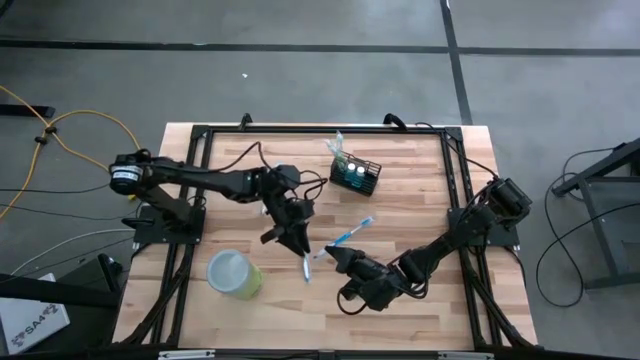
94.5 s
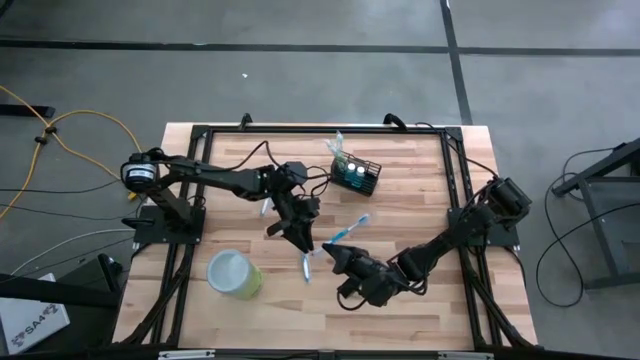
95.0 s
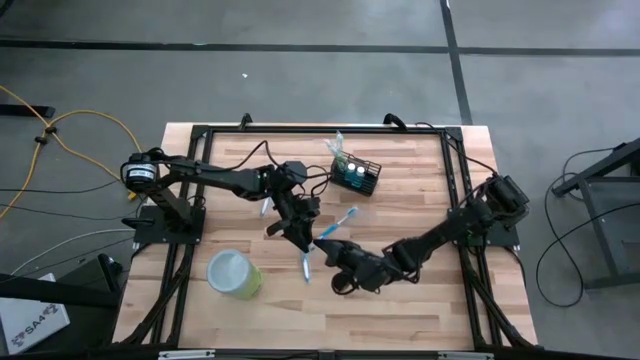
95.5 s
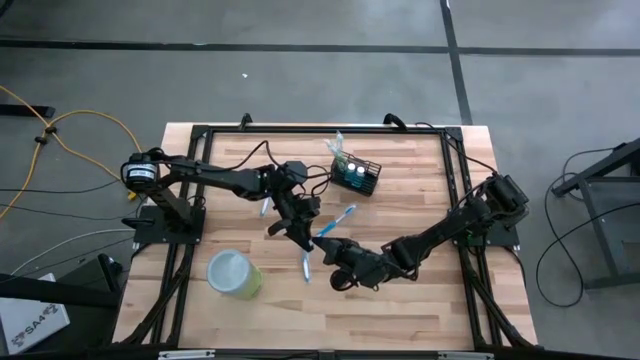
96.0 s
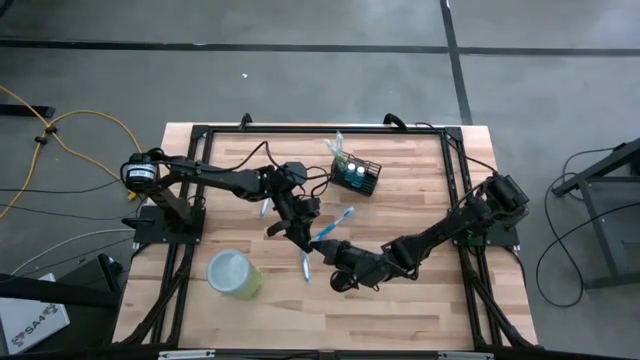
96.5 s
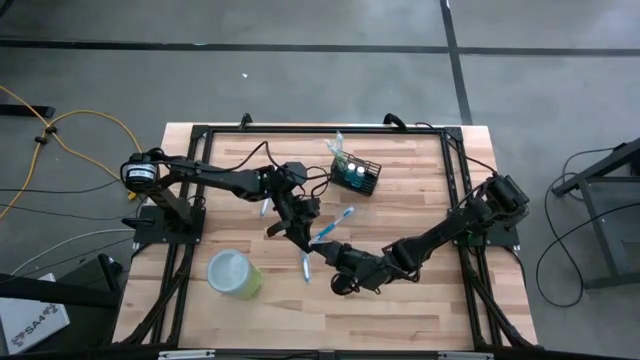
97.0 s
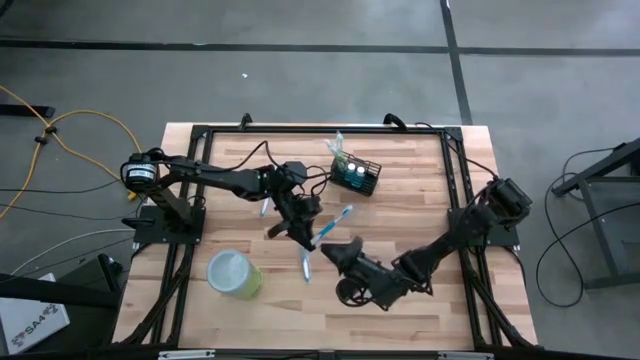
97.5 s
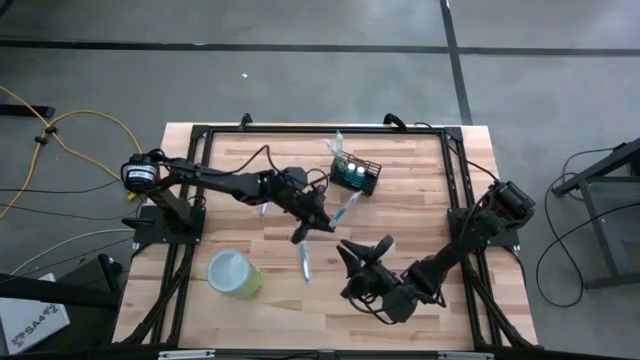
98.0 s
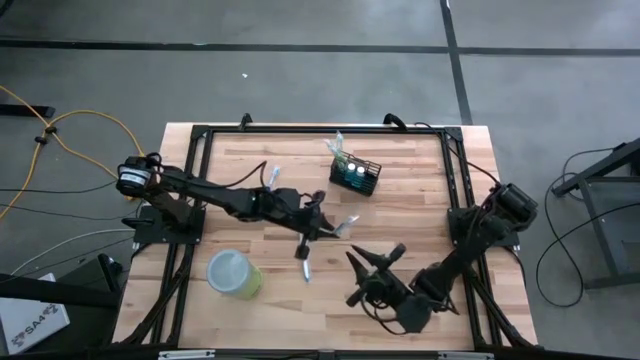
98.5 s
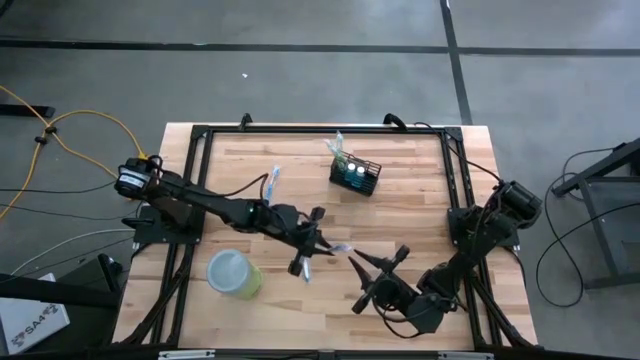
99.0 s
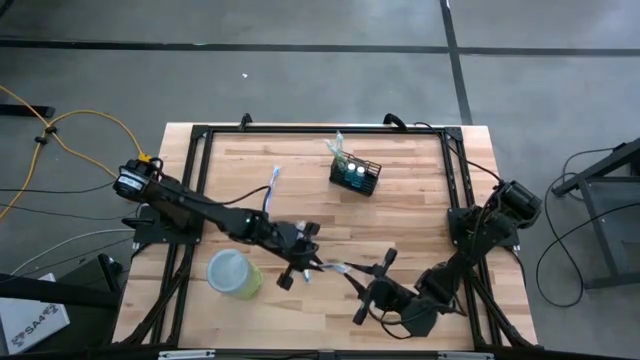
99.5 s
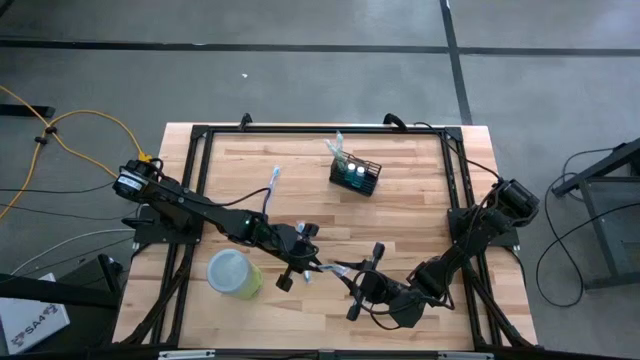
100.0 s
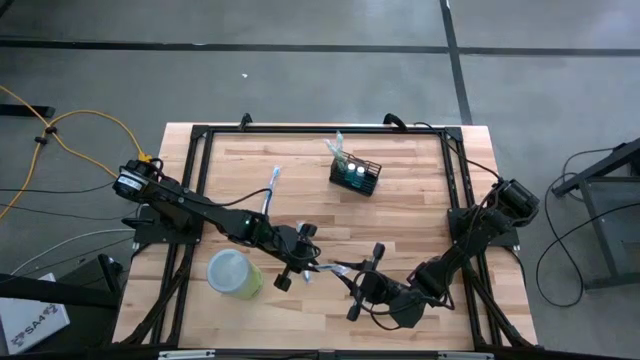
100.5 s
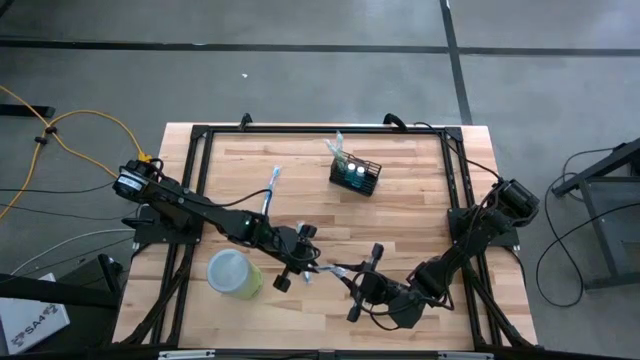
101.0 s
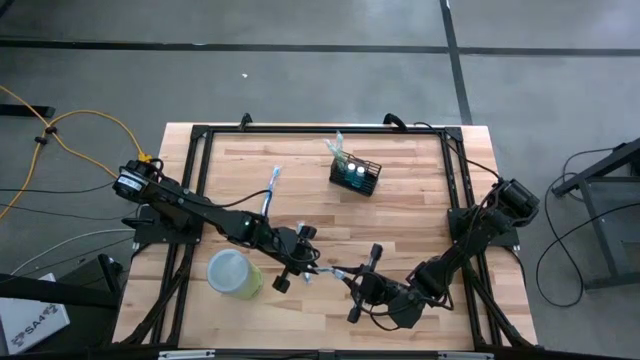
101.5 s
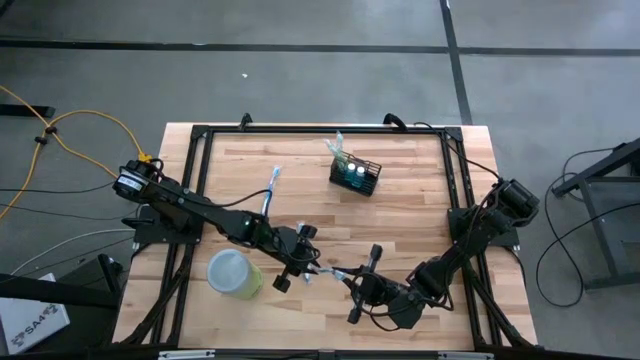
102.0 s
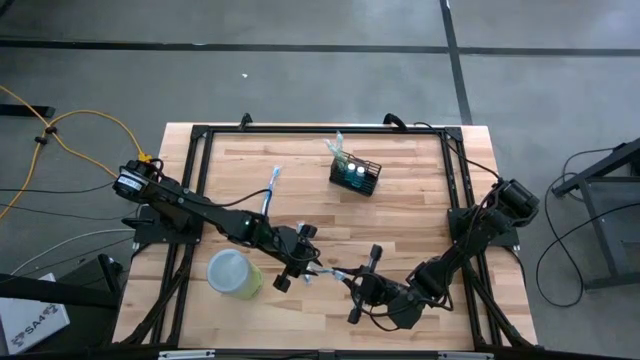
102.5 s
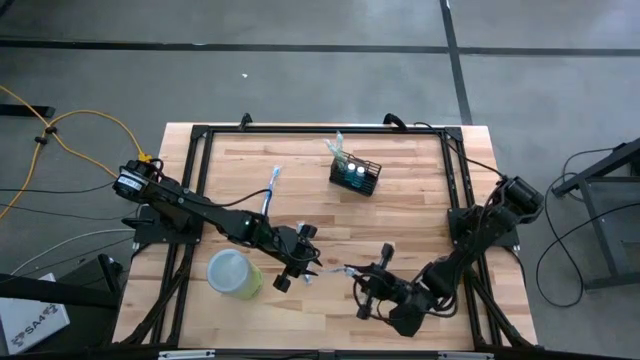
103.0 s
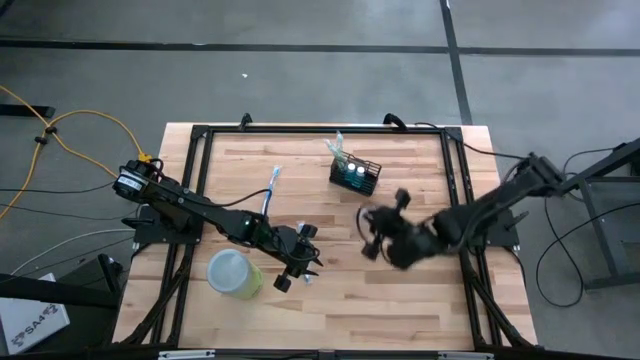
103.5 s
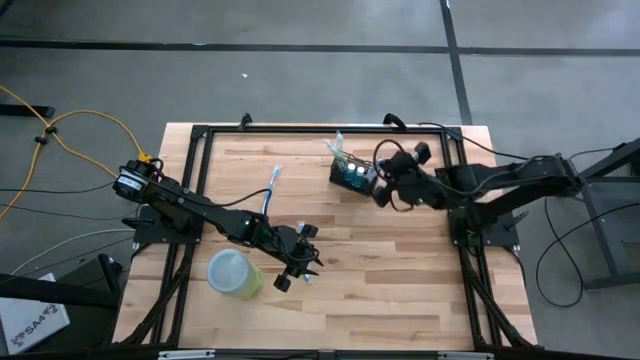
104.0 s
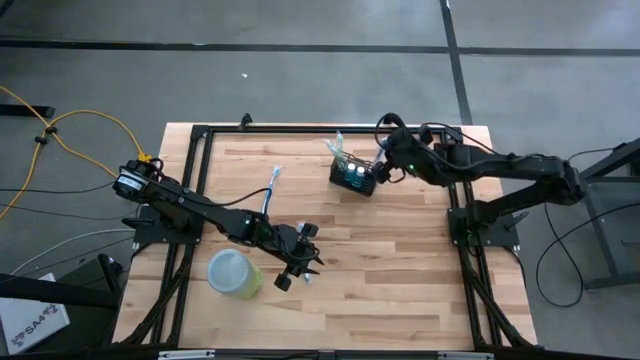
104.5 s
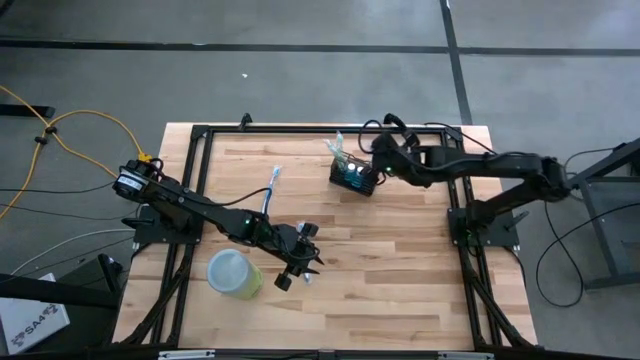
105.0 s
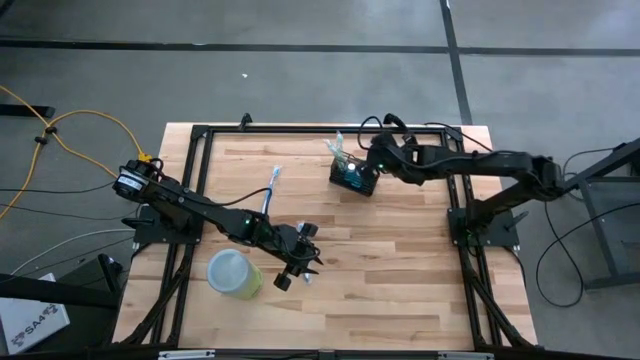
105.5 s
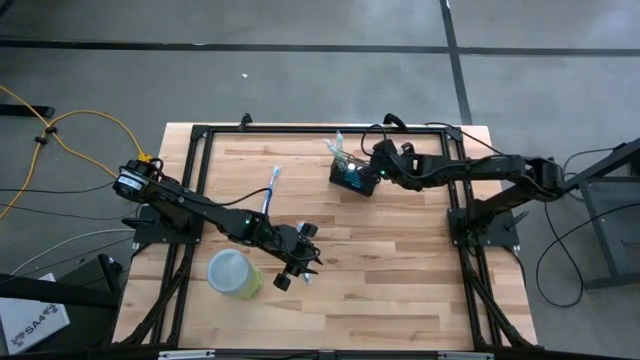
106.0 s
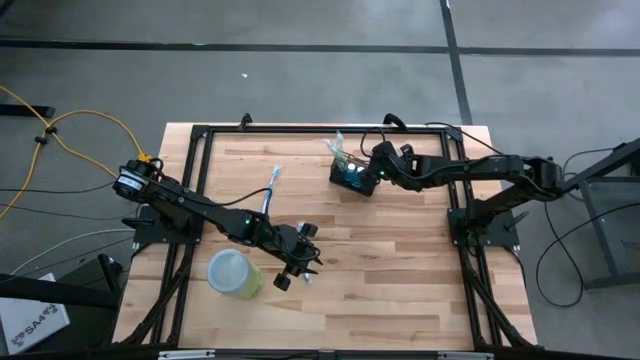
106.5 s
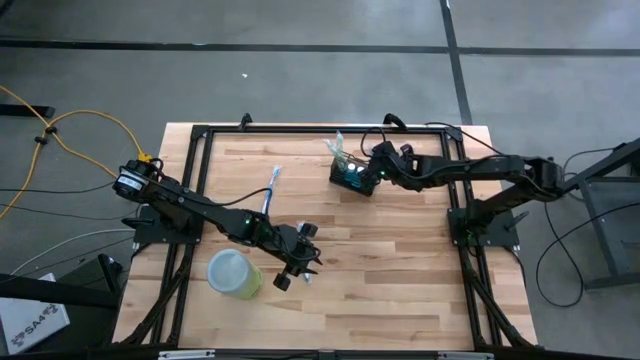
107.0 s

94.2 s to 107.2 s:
Task: Pick & Place toothbrushing station
Put the top right blue toothbrush into the right section of the black mesh organizer

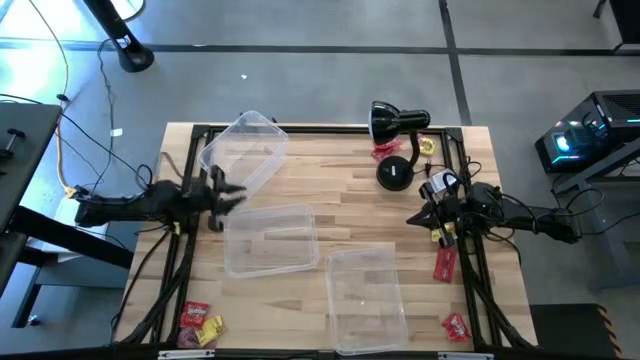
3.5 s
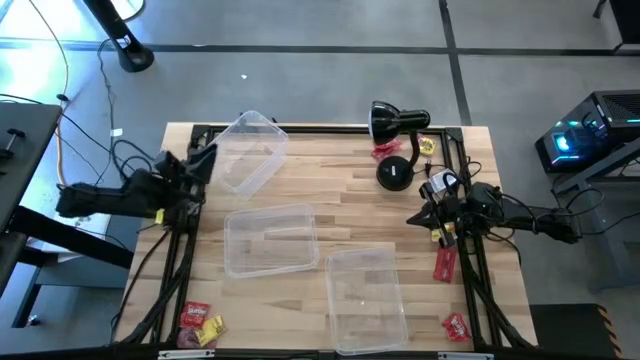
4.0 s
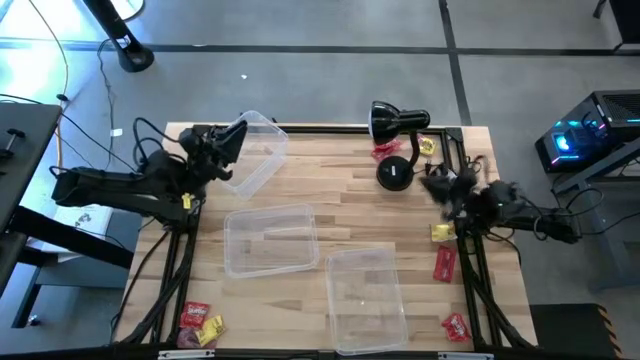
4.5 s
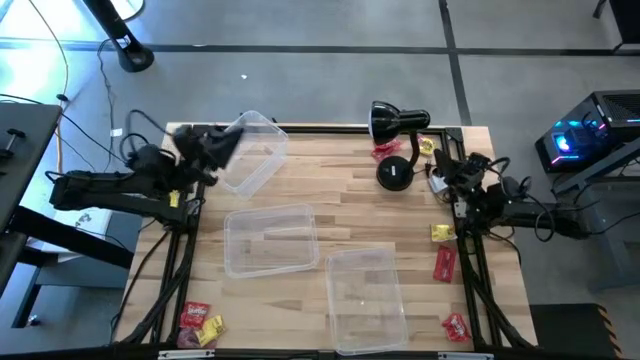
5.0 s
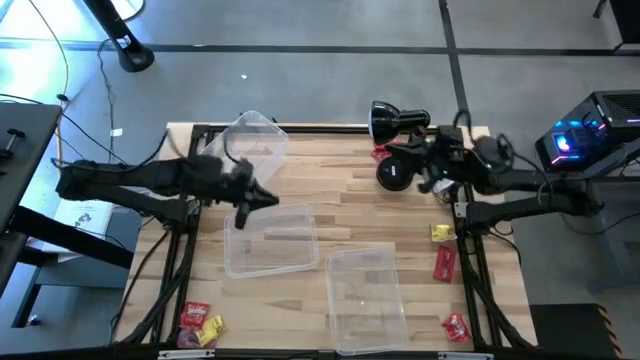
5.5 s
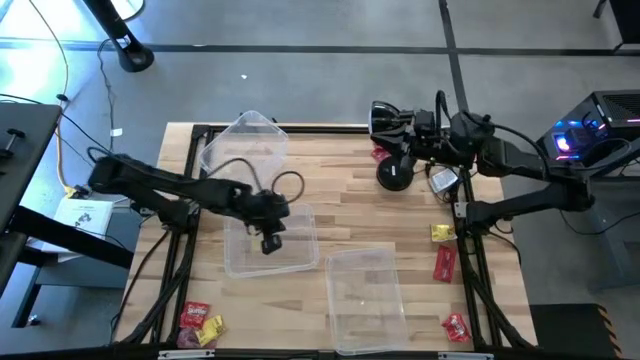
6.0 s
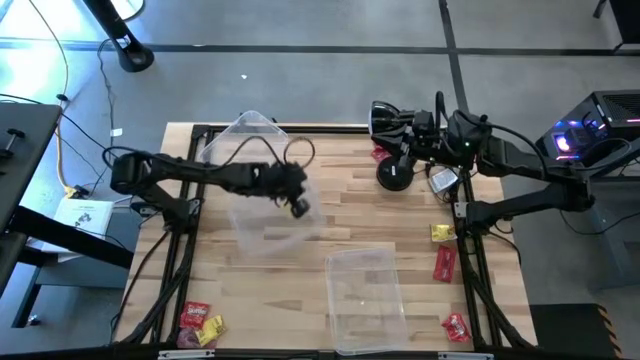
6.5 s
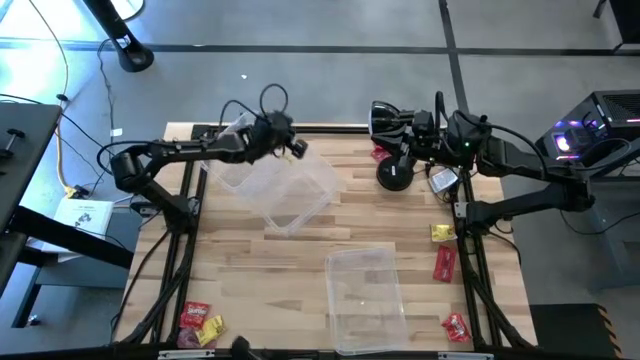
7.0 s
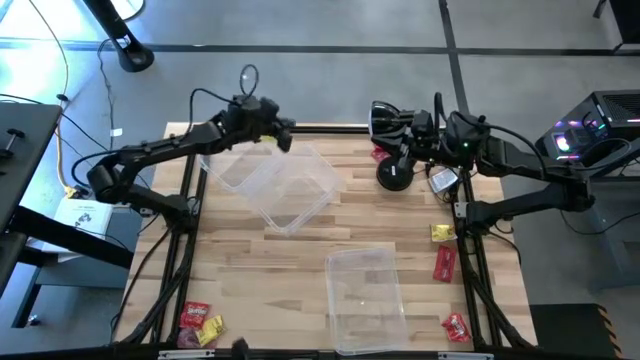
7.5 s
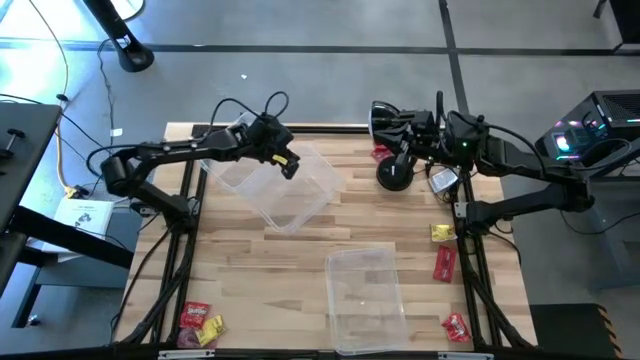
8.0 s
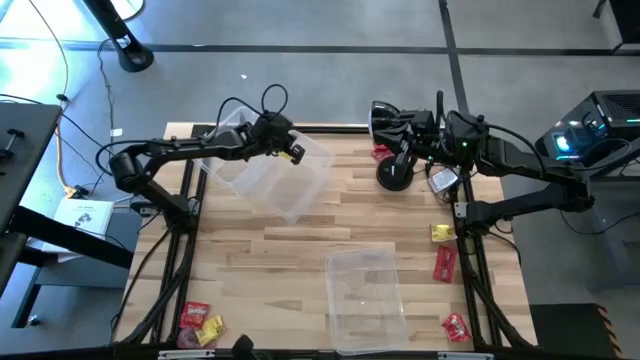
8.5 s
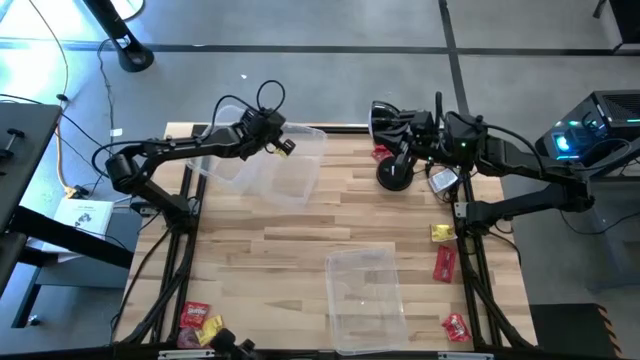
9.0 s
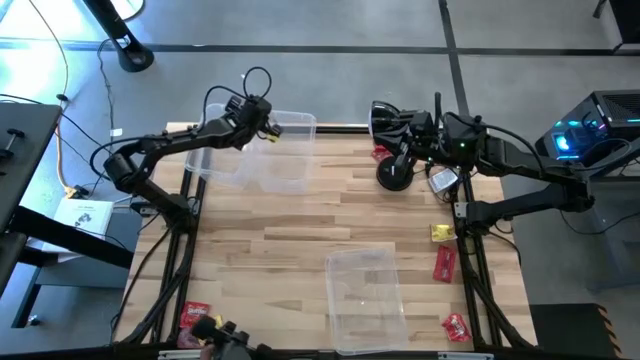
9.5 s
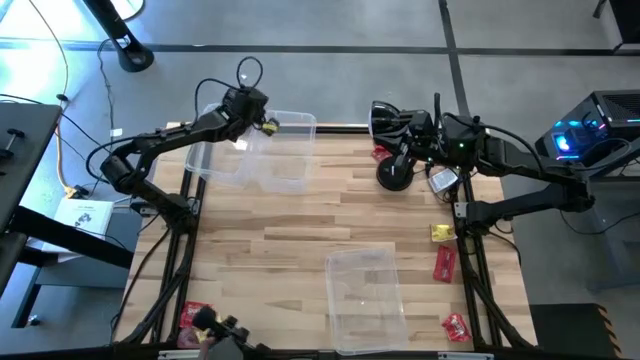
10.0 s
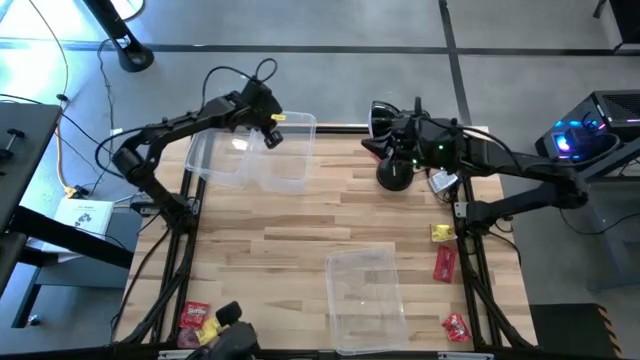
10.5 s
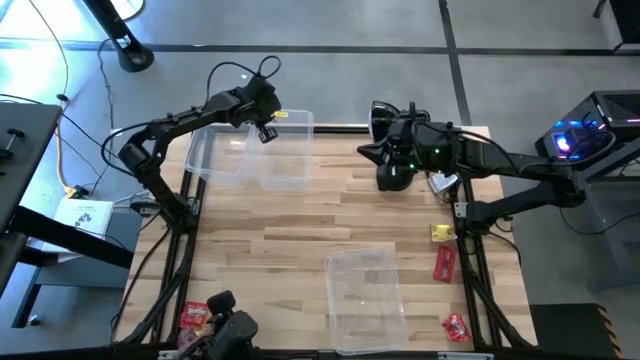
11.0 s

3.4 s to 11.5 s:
Task: Sort candy
Move the middle transparent bin to the top left of the table
